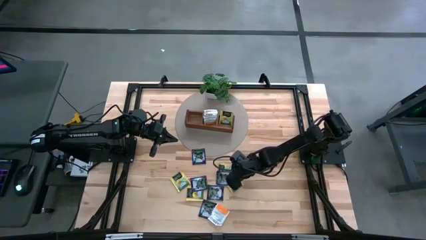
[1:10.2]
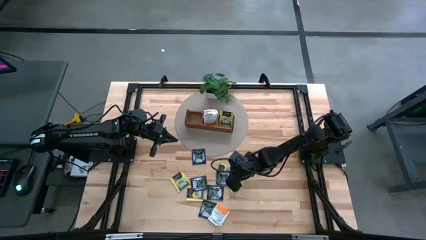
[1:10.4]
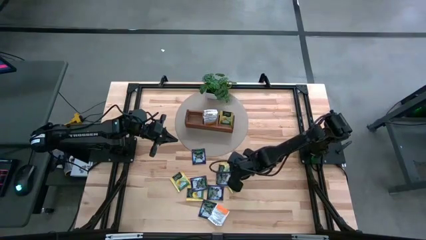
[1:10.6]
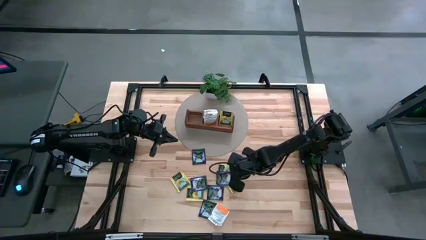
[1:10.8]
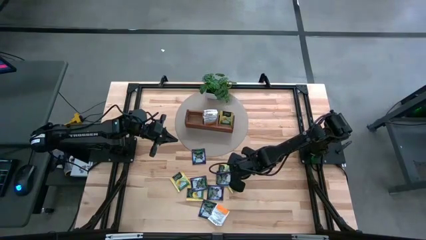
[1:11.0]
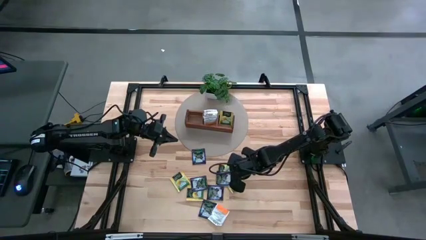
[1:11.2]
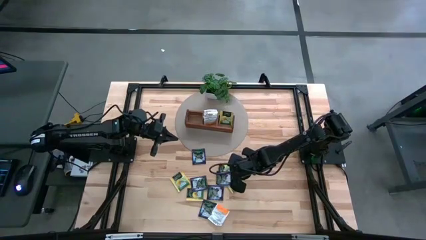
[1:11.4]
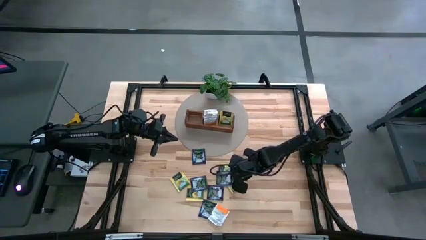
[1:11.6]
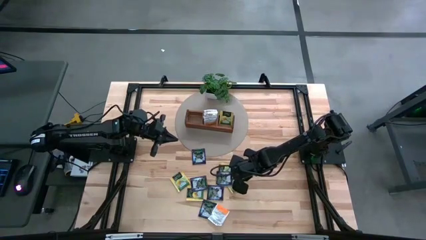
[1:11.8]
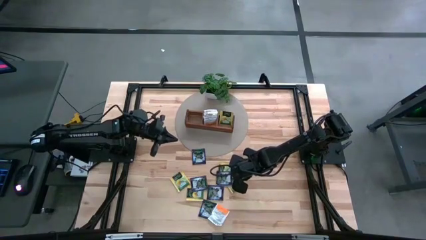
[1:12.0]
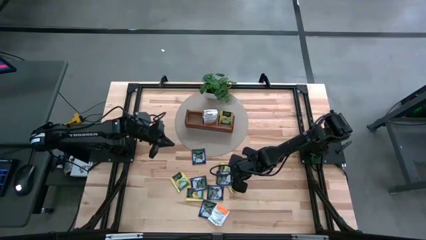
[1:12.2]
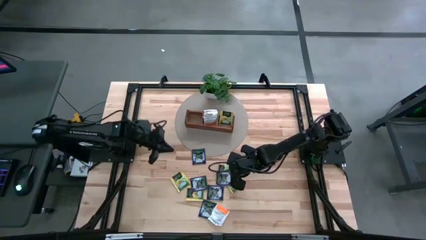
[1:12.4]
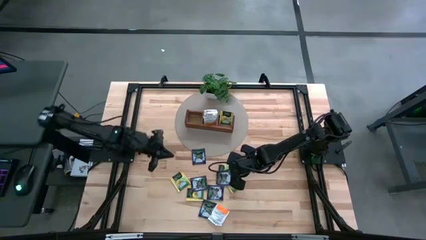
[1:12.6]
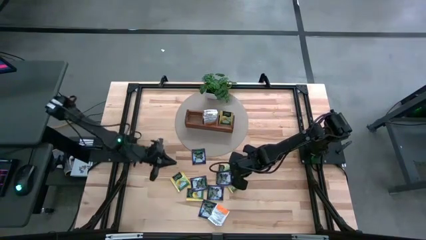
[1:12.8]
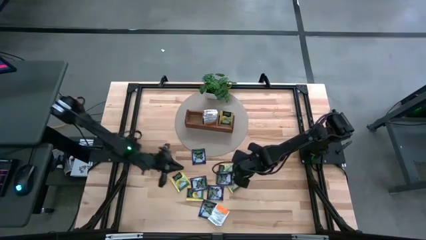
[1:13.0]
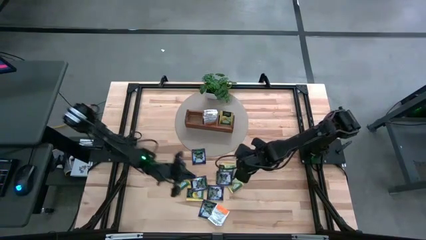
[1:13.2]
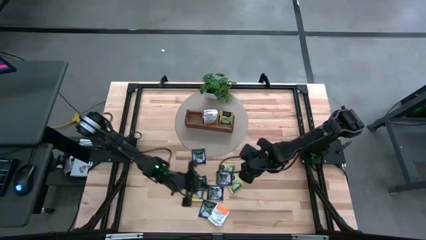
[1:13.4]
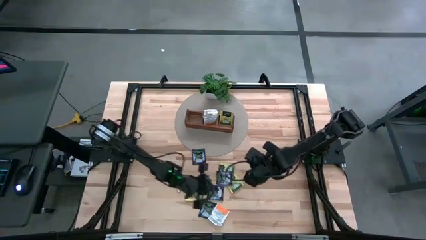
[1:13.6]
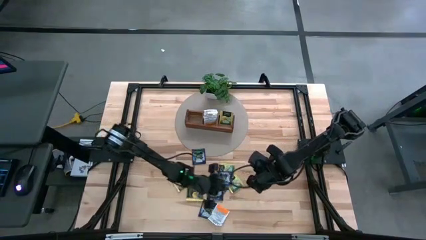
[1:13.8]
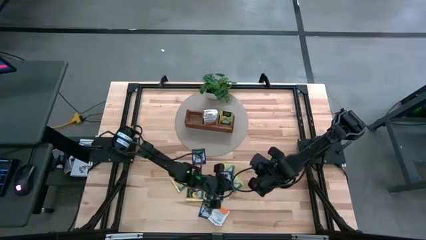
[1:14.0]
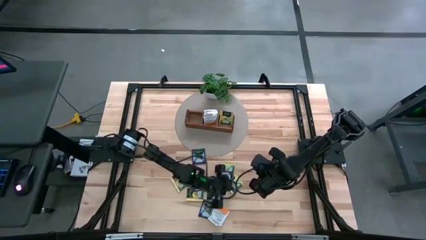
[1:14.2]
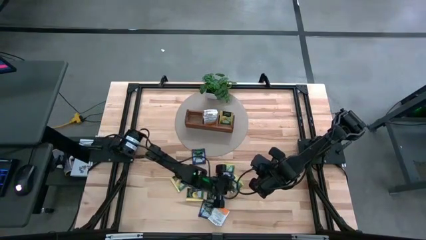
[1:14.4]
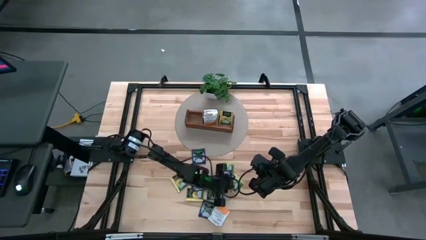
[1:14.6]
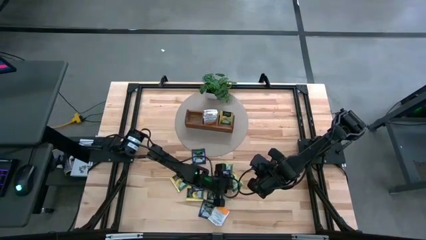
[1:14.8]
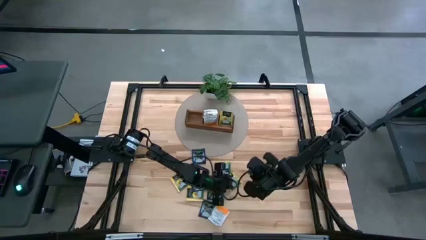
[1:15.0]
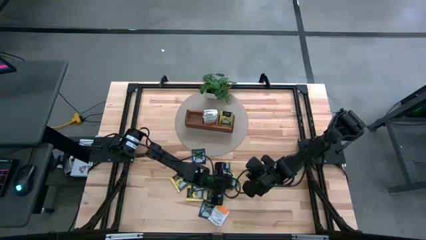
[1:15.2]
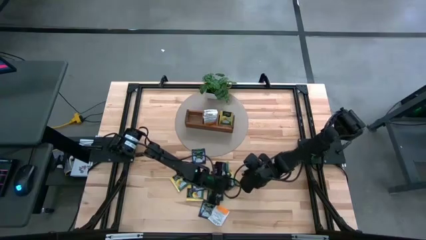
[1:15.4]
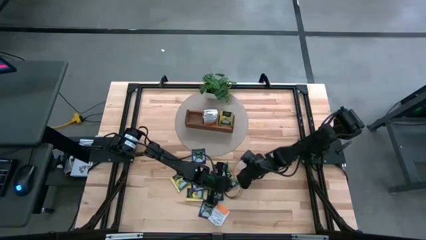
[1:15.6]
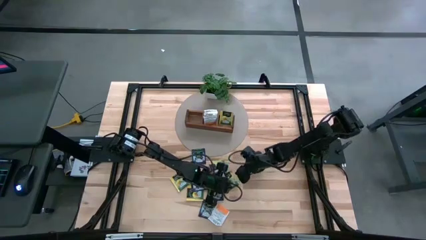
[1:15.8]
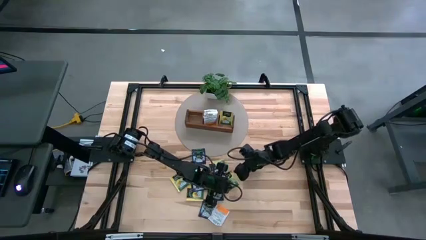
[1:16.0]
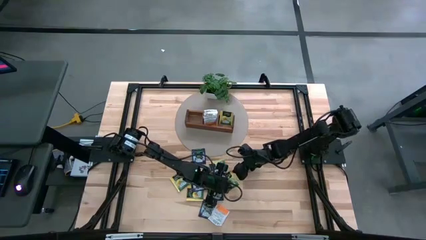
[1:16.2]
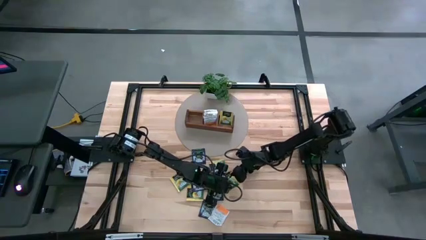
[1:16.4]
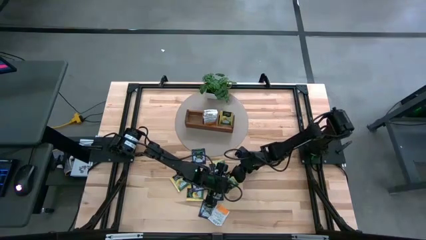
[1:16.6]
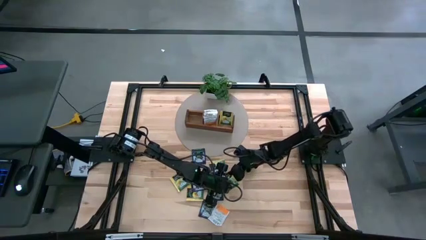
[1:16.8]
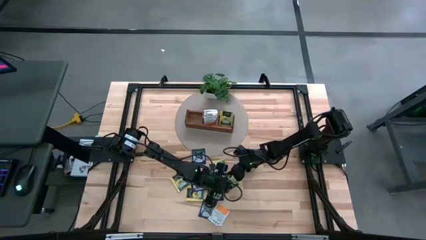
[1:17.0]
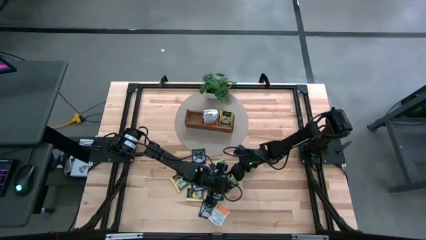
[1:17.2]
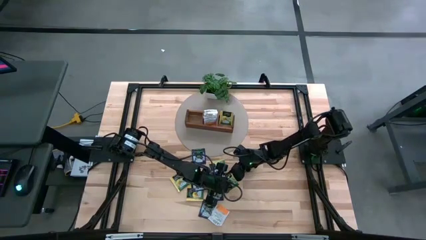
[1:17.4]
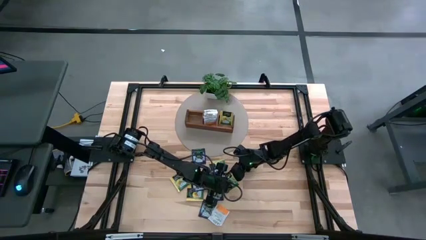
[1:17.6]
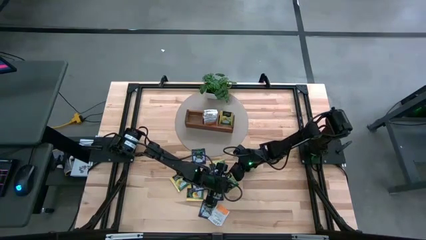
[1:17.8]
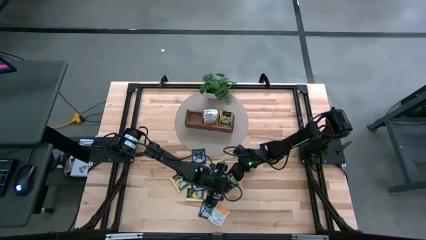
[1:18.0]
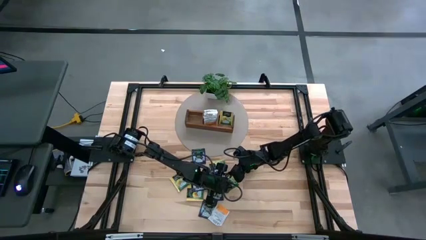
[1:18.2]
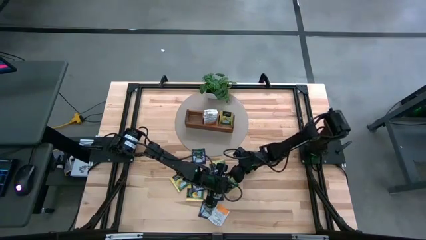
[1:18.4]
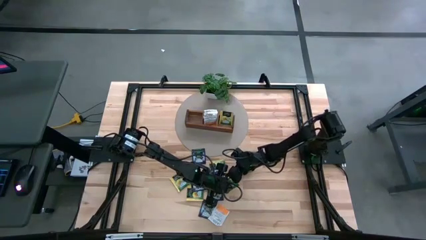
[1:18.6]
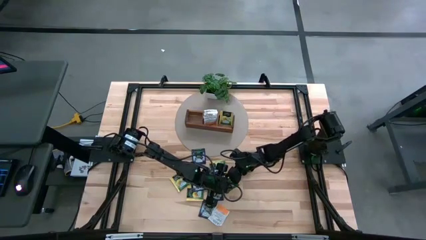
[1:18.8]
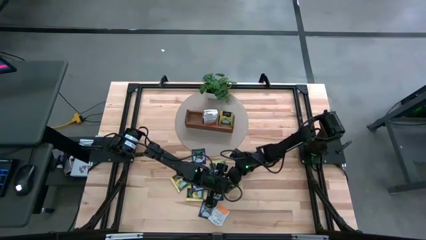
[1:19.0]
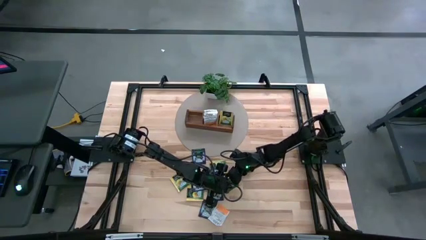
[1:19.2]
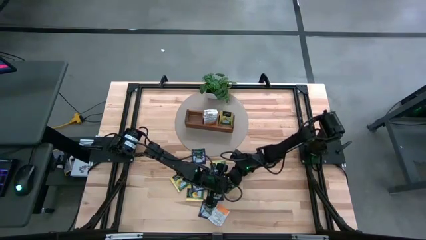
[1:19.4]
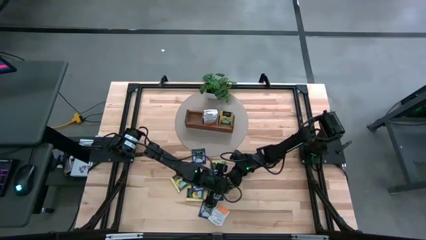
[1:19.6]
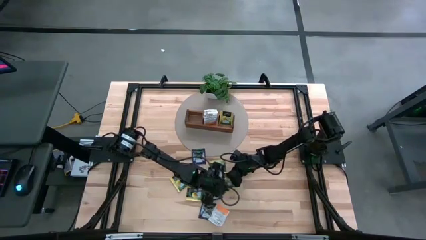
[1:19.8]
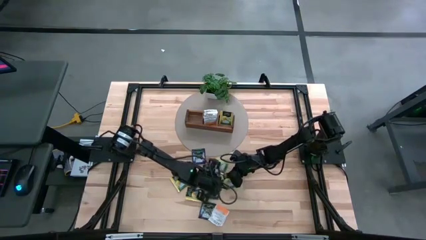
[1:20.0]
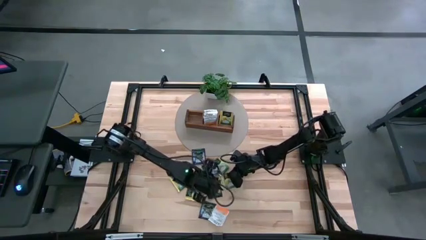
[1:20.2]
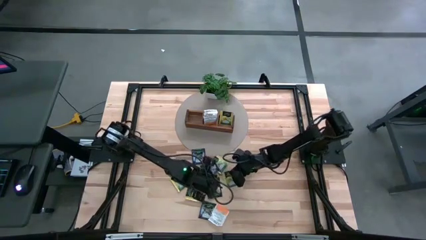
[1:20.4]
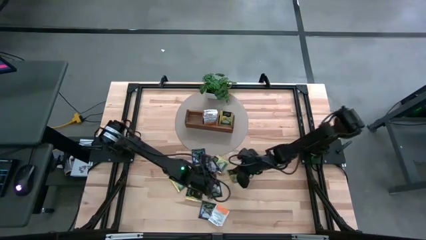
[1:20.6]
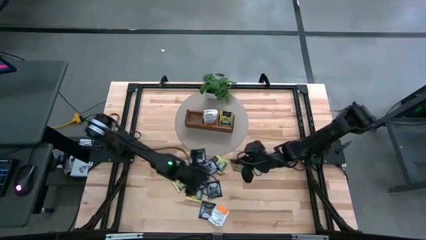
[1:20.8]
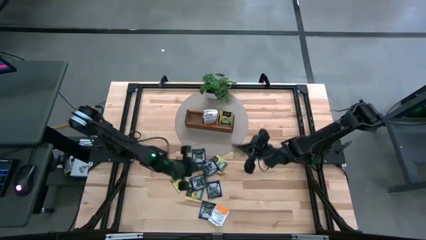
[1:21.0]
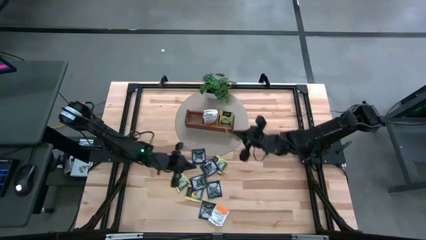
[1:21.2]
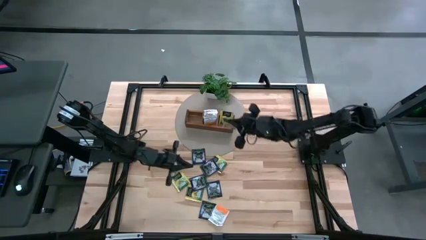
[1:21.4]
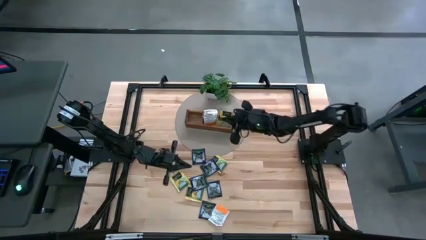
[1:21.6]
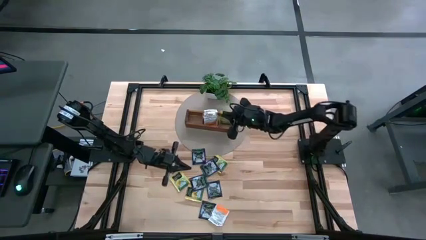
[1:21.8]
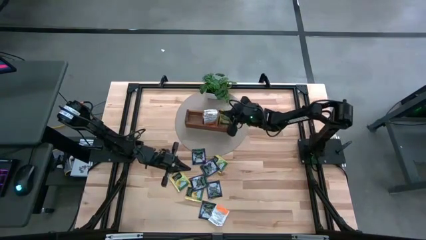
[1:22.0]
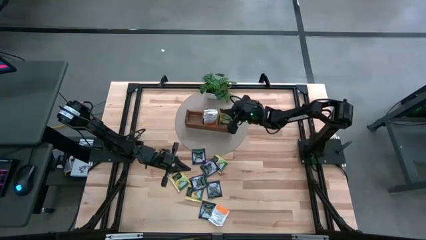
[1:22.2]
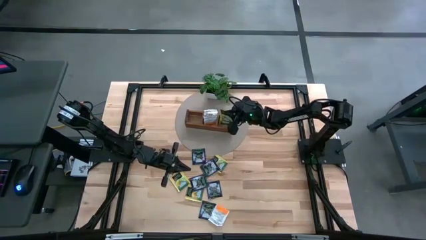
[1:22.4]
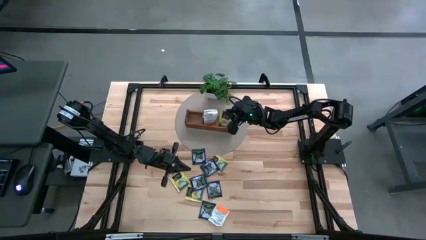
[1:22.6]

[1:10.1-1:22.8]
Task: Pick & Place Tea
Put the yellow tea bag into the right section of the wooden organizer

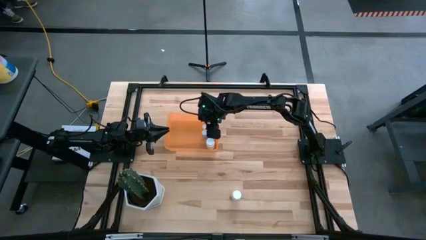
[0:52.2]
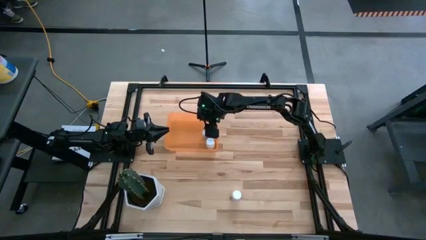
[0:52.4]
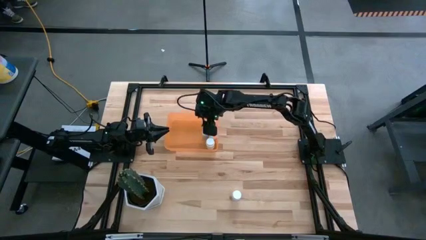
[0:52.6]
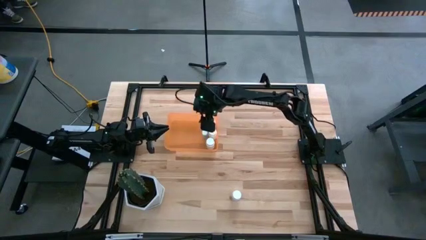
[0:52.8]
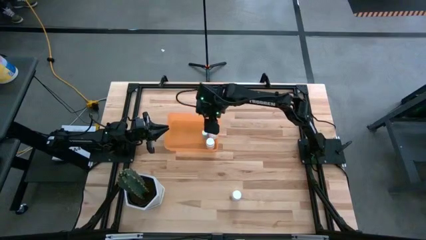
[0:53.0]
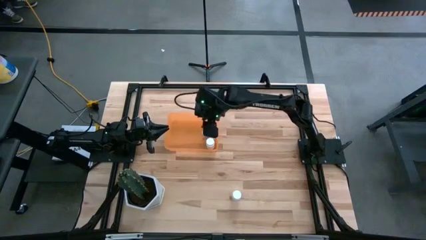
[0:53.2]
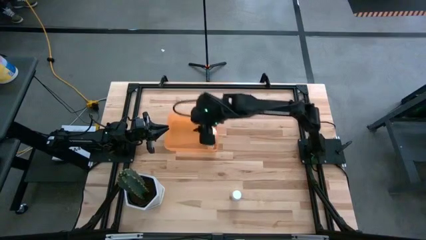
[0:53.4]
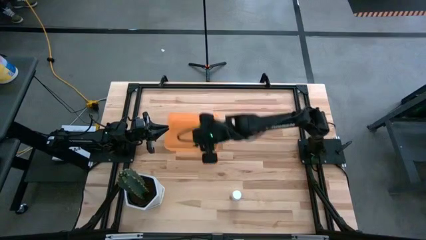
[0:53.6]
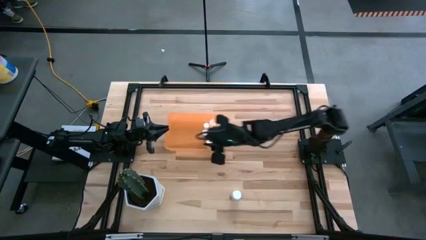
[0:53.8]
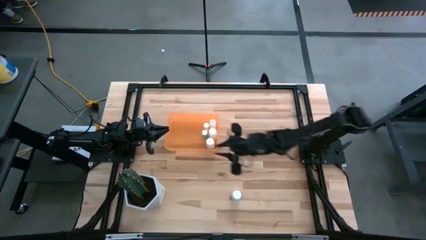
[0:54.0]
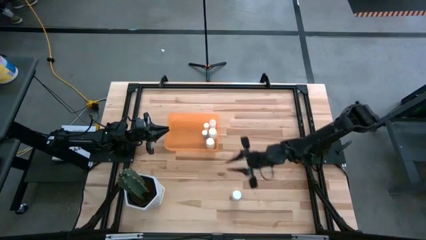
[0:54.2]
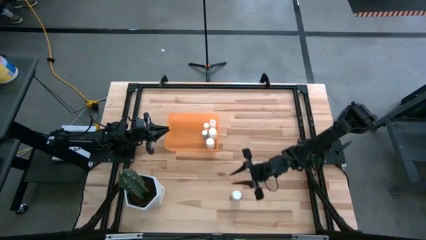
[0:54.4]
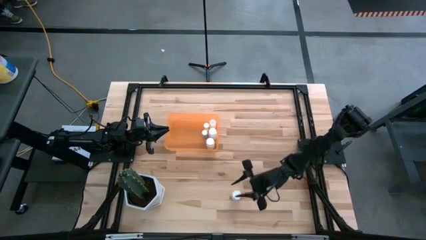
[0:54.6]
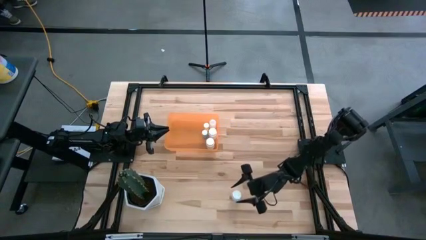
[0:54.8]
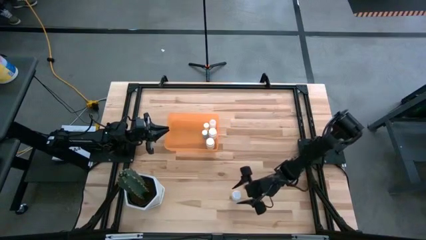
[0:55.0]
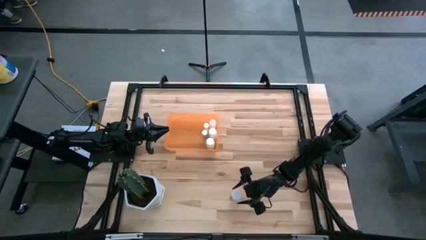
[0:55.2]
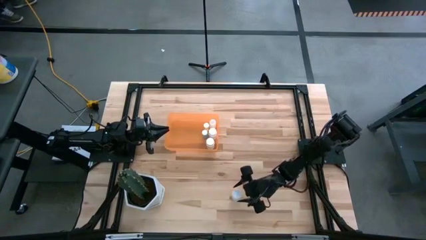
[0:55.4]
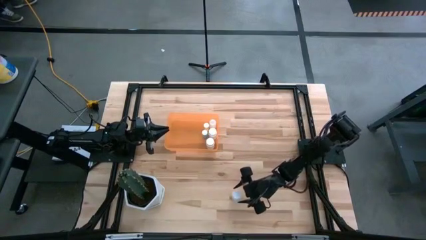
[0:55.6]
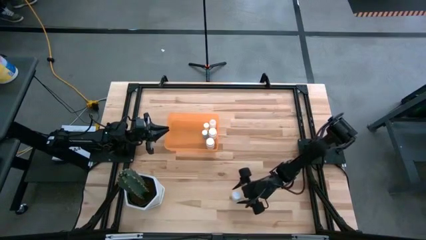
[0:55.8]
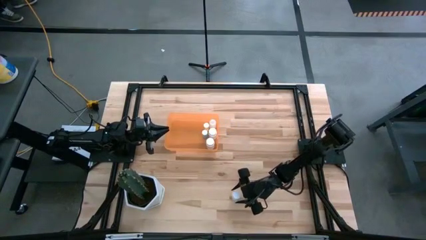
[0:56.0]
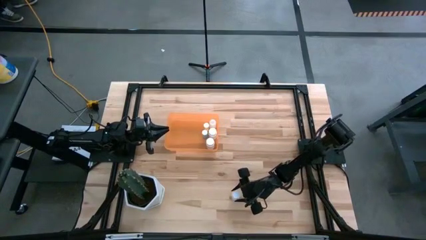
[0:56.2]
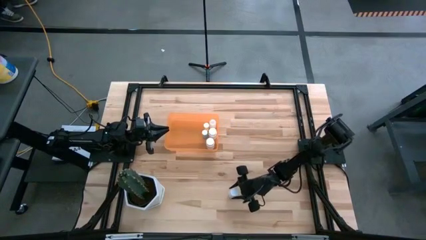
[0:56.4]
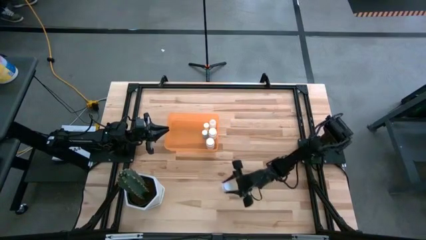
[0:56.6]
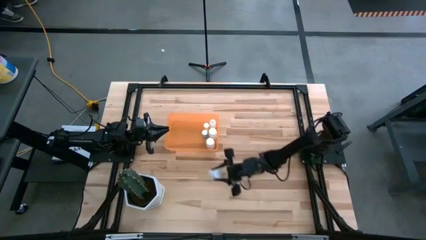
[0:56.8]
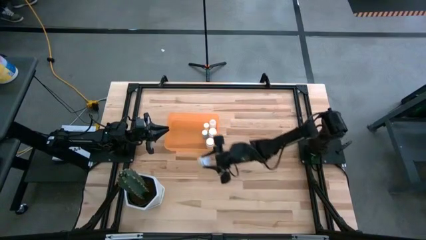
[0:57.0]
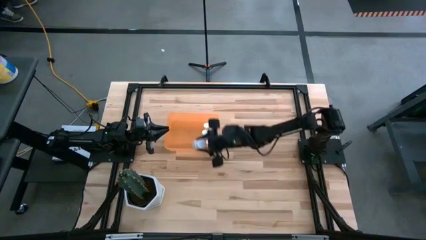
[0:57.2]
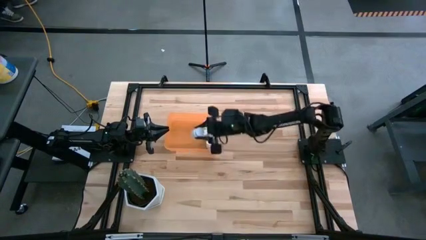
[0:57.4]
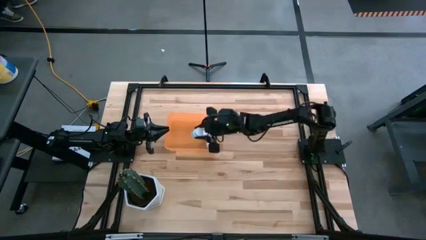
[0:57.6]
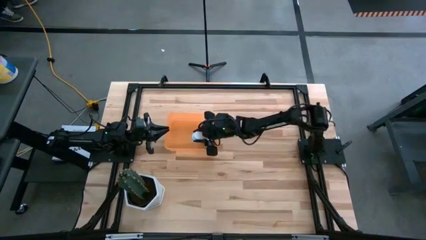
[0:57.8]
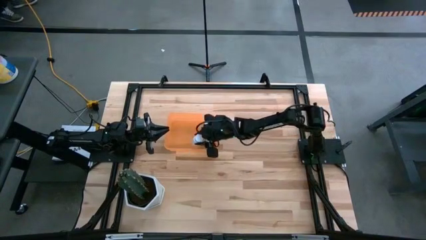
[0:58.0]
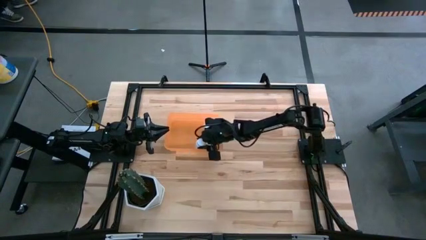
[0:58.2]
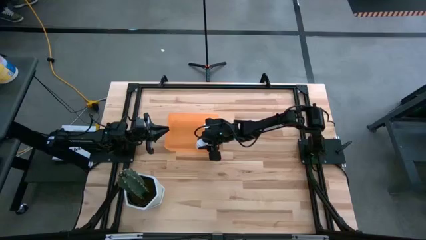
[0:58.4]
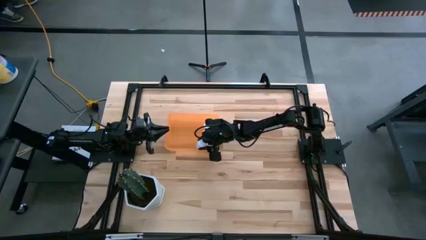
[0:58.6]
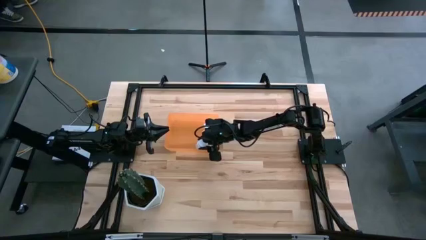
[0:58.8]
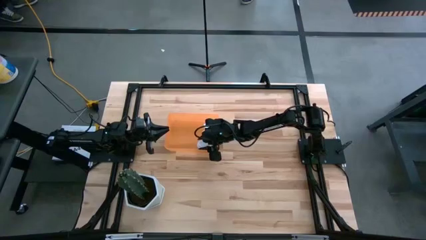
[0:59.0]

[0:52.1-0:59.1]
Task: Pick and place pill bottles into a basket
Put the white pill bottle in the orange bin
